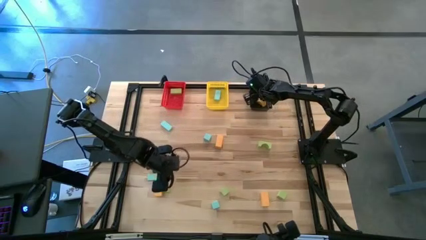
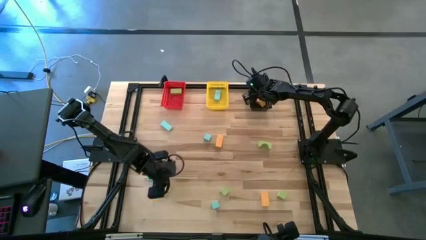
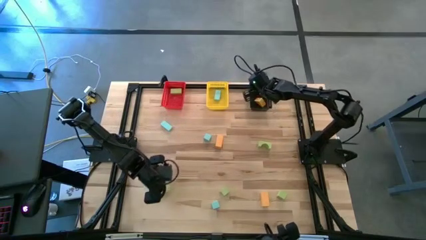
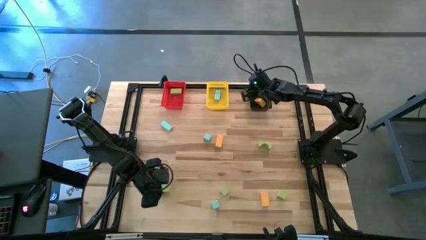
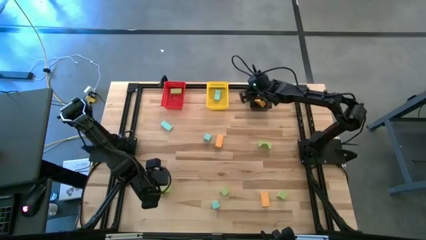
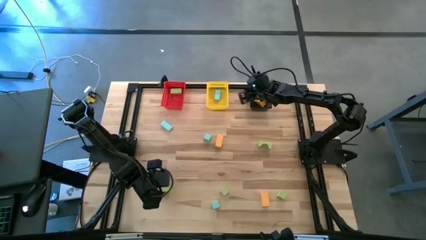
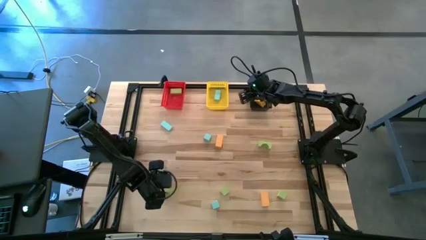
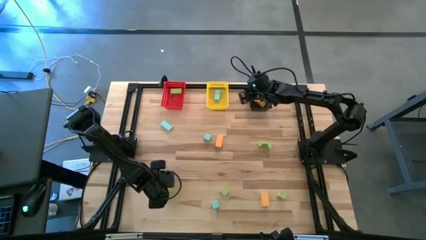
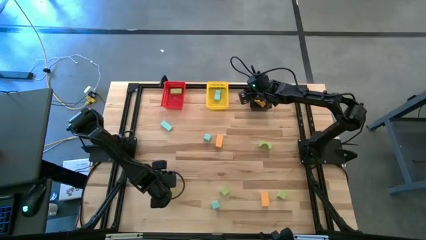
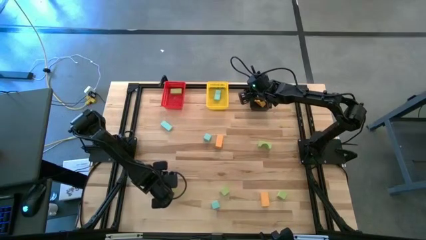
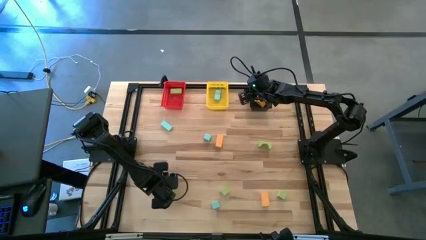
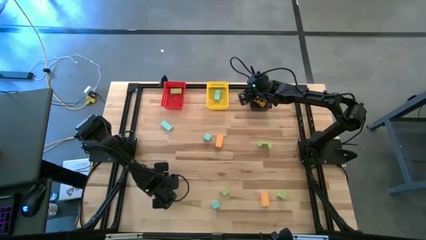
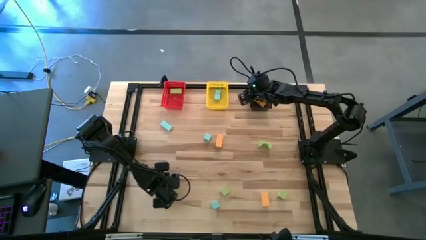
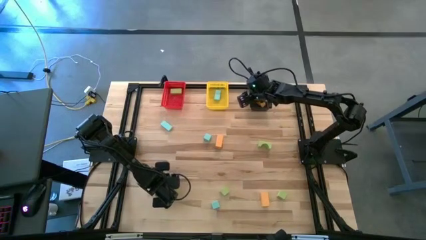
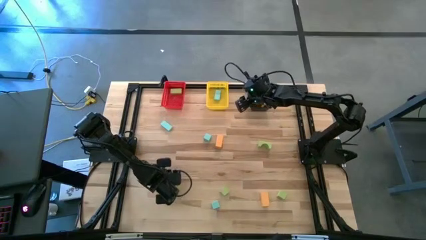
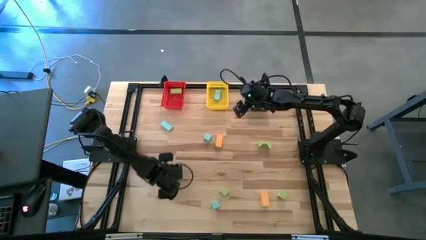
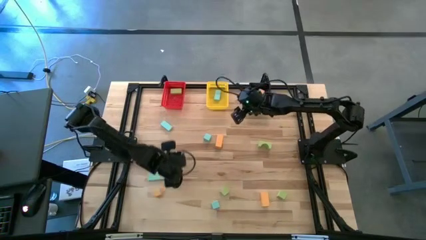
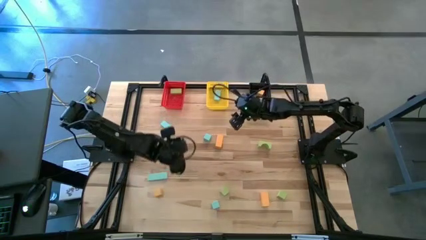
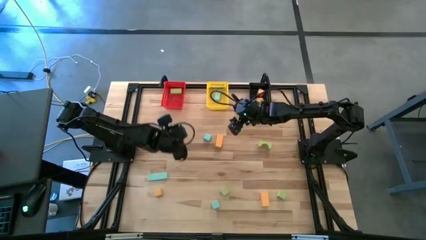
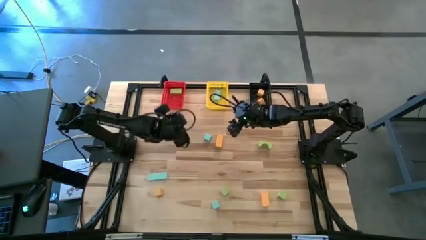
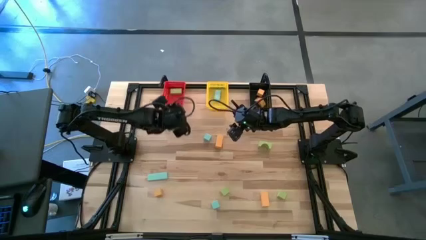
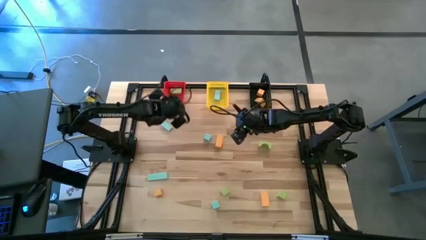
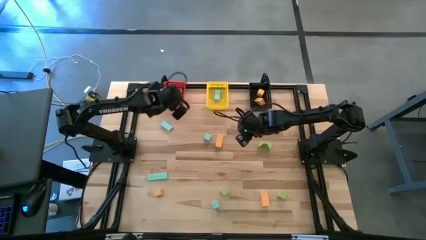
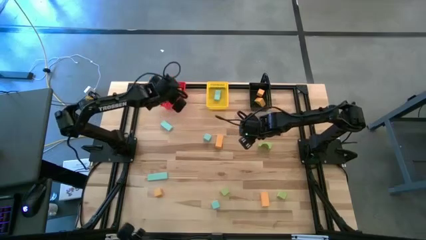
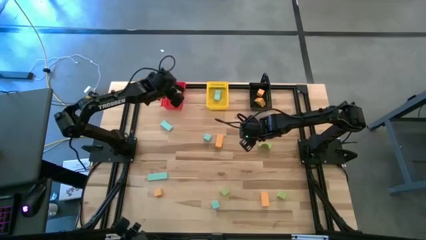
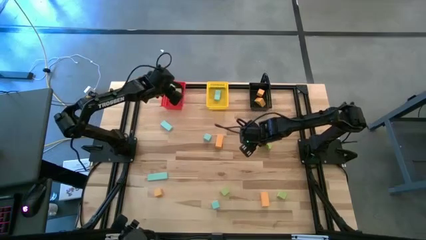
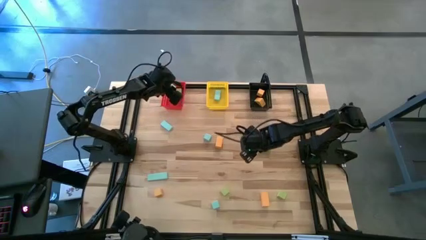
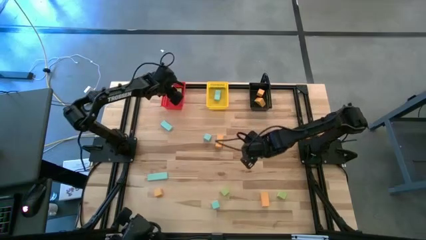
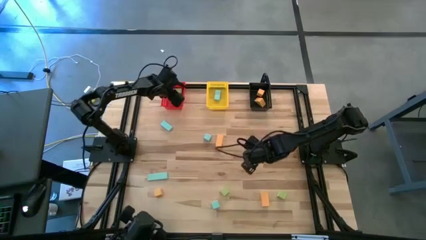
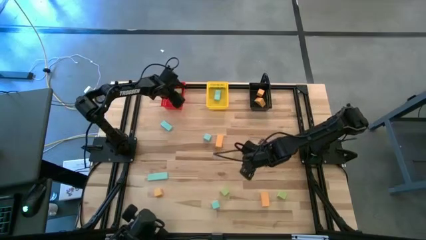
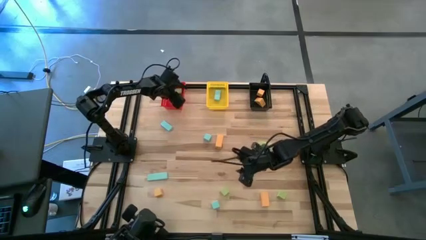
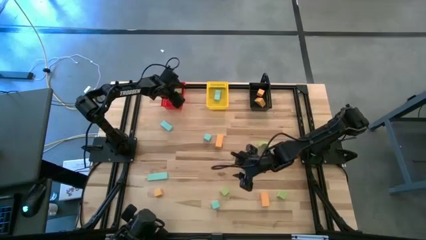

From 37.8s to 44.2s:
Task: Sort & place blocks by color
Put the green block into the red bin

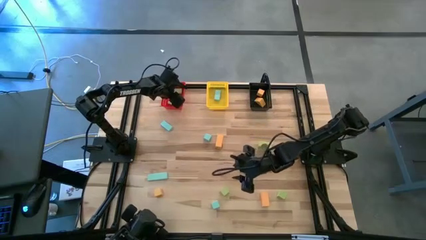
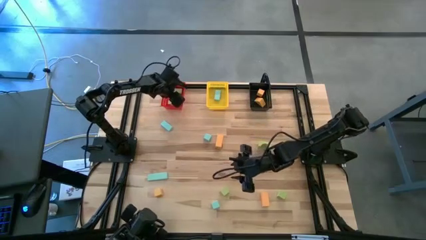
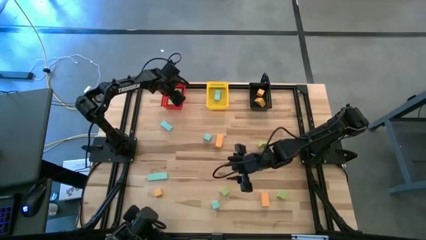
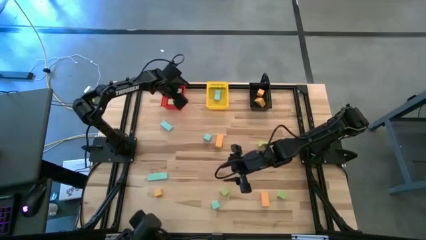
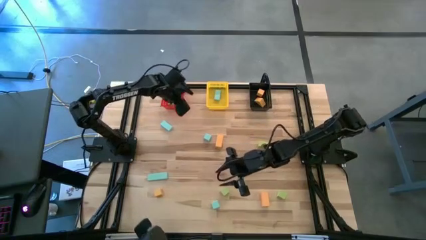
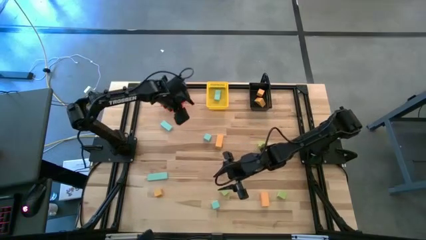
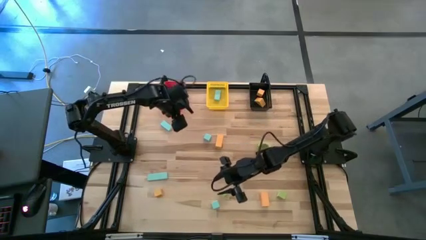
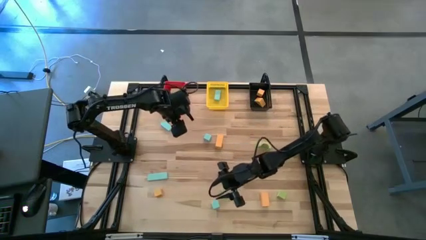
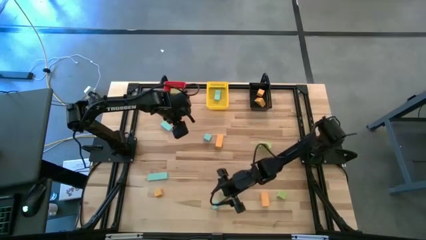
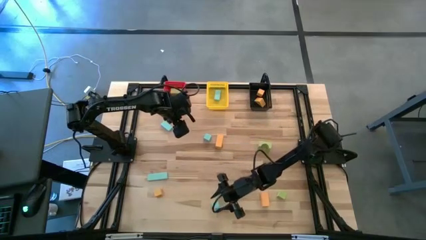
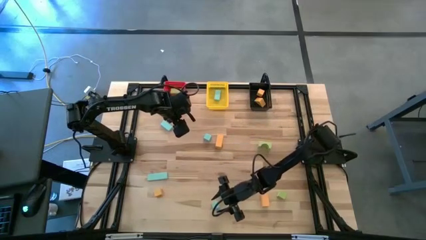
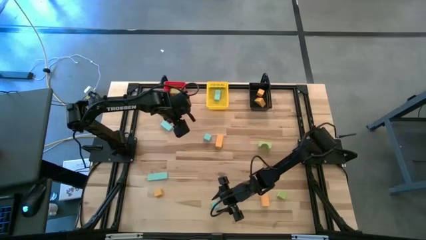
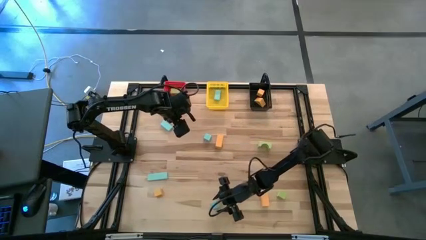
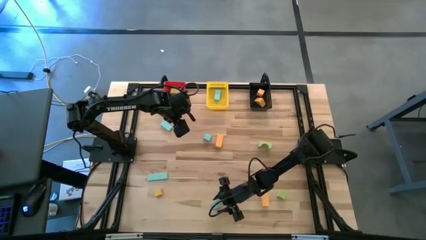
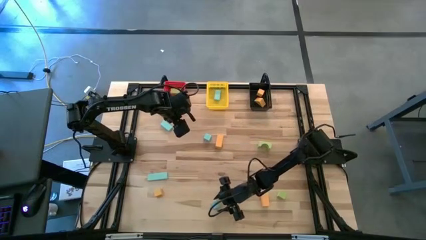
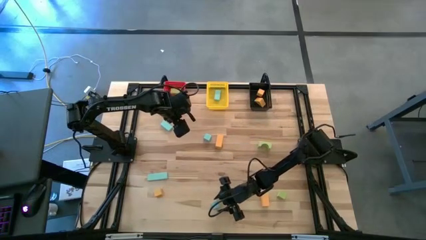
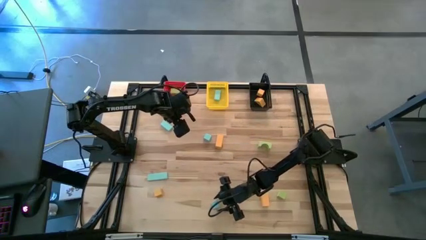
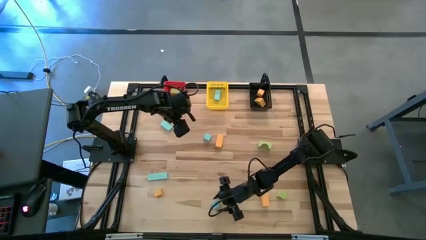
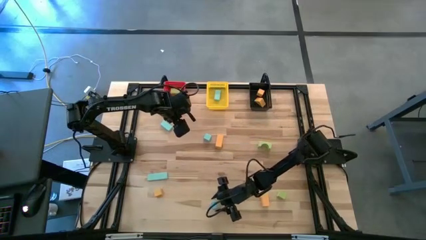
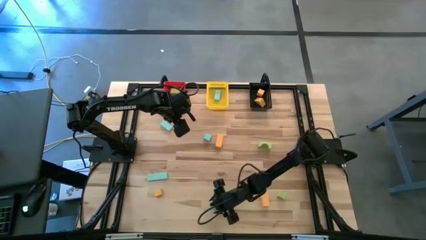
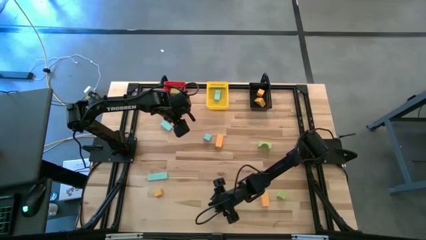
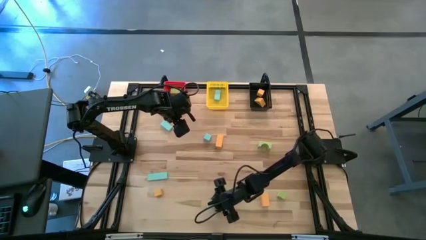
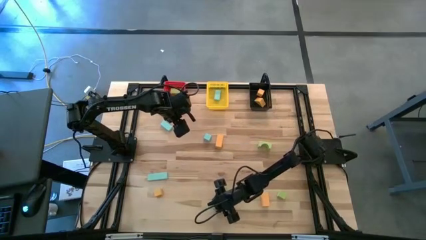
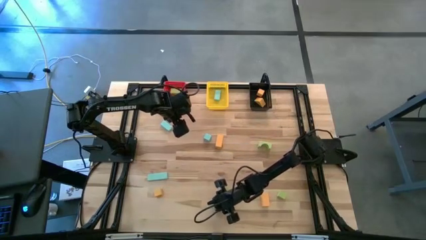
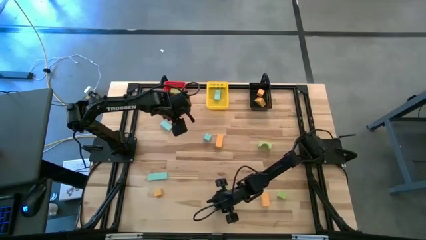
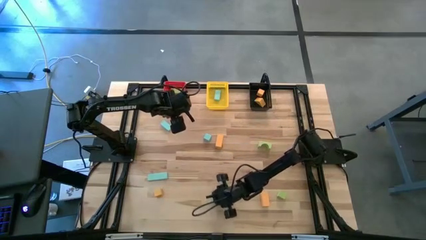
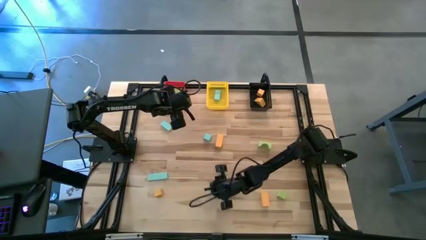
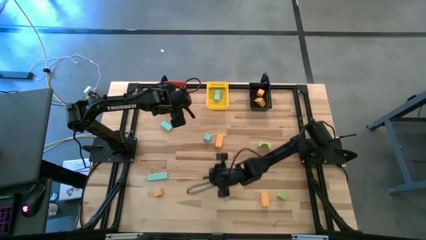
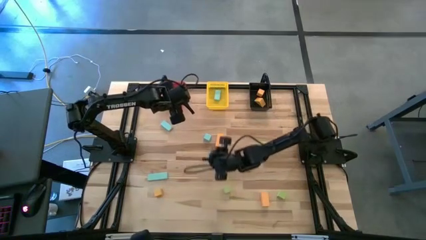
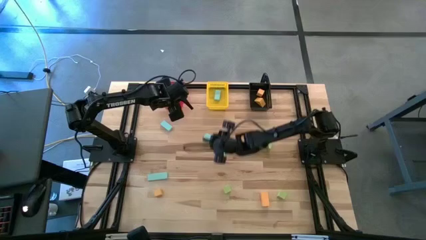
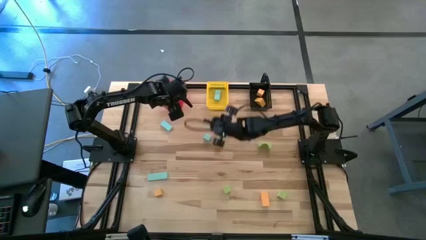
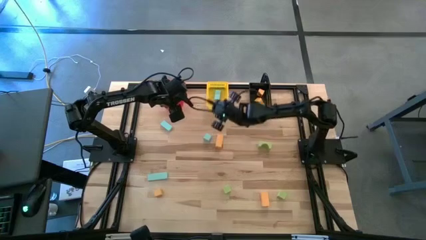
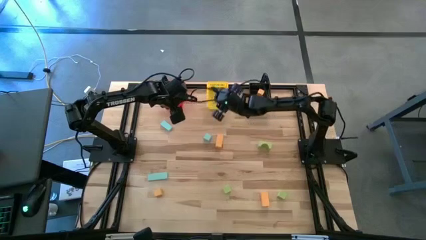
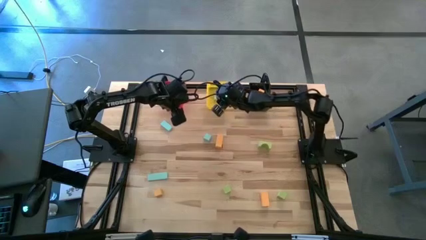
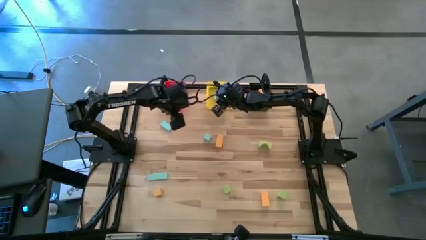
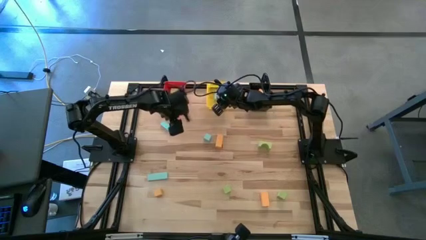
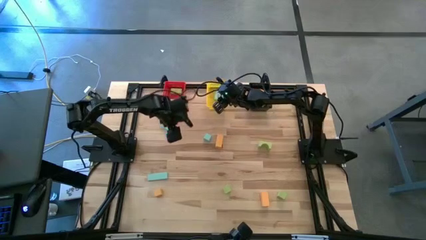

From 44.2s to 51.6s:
Put the blue block into the yellow bin

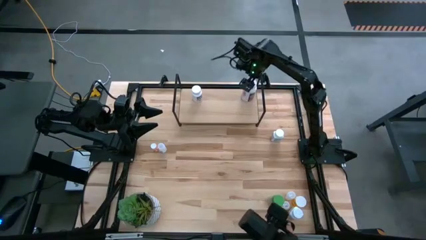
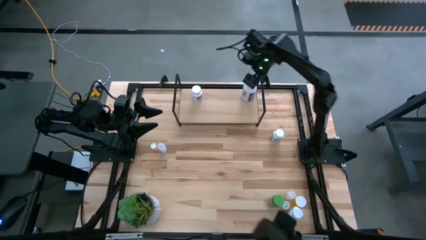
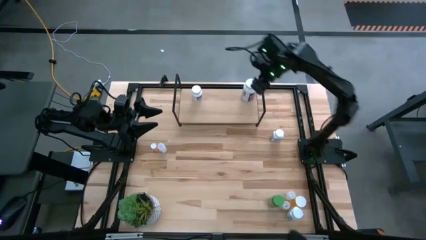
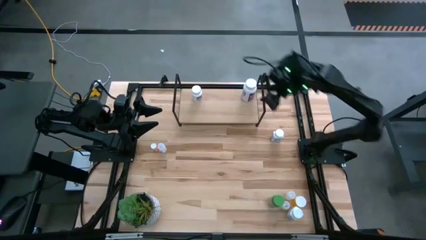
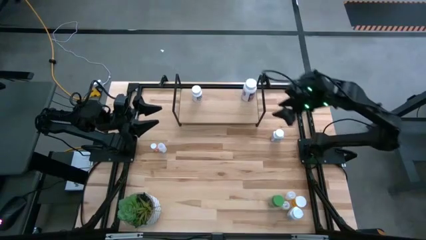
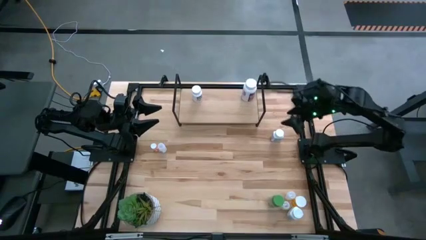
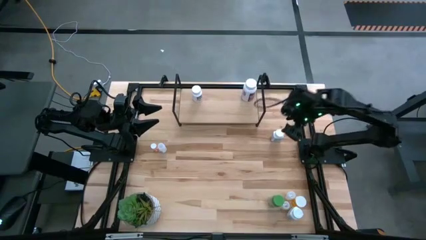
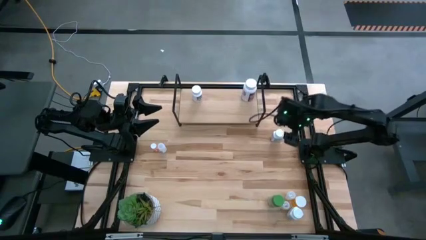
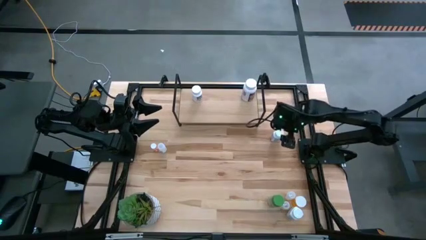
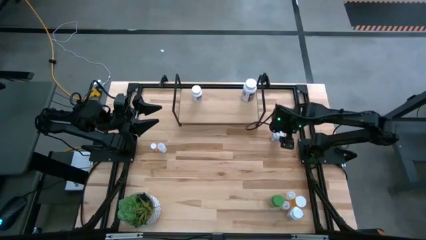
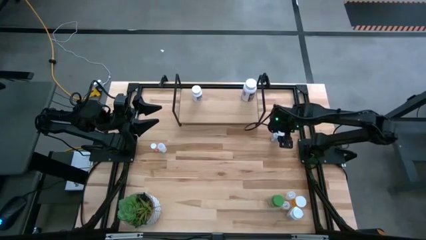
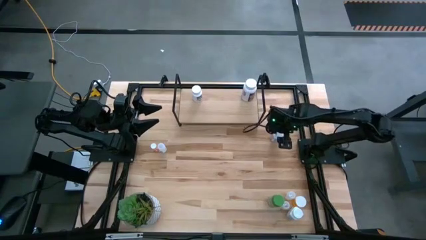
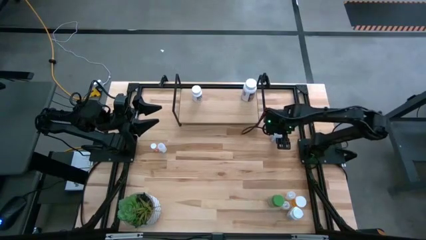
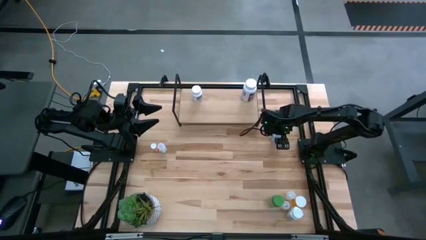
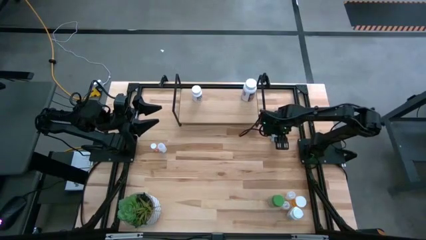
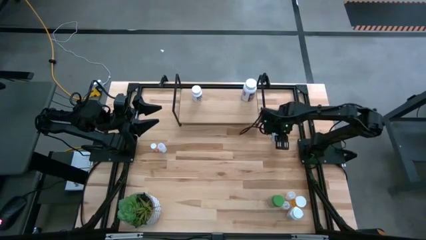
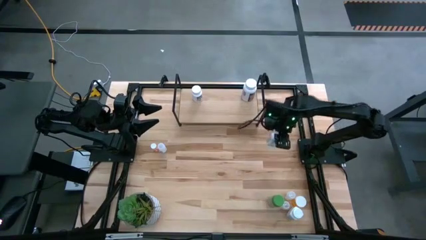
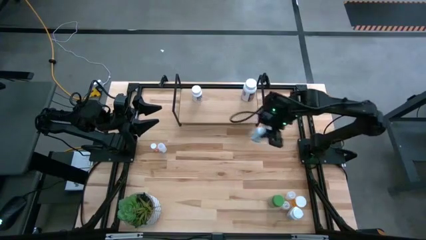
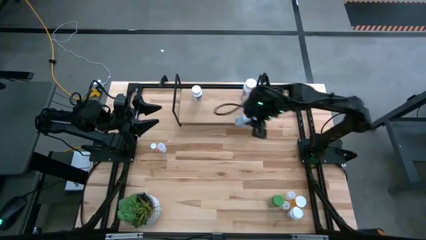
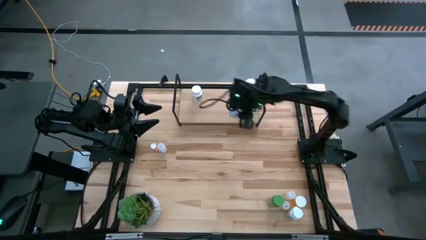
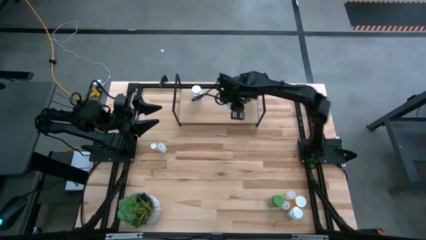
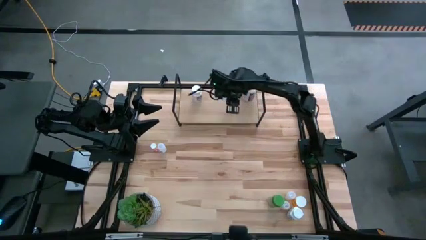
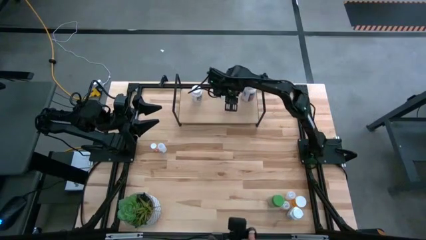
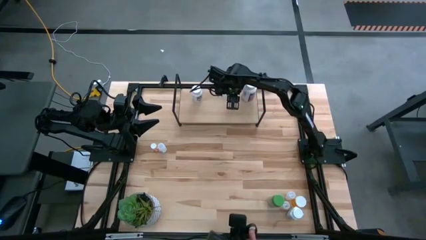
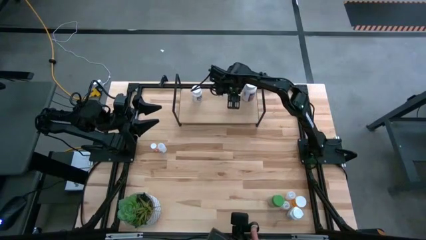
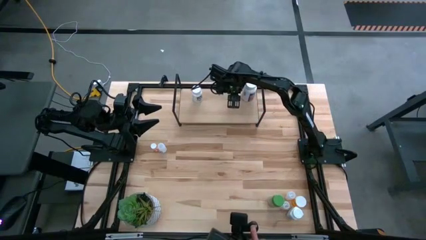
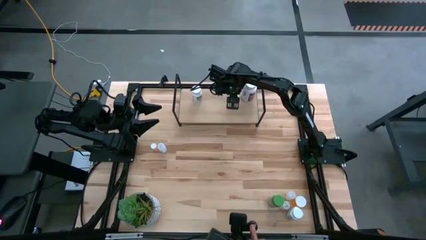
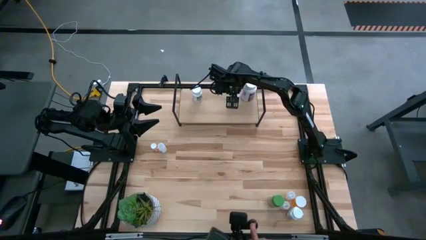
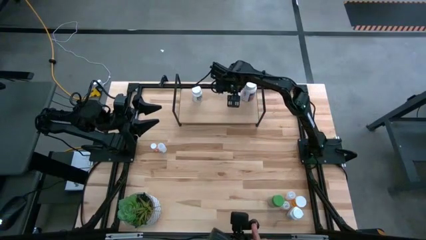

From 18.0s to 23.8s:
Task: Pick and place medicine bottles onto shelf by color
Put the white pill bottle on the shelf
